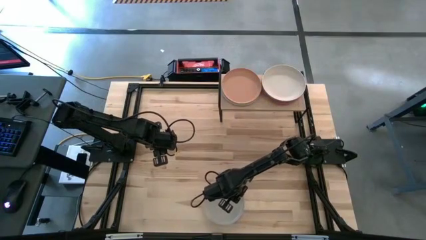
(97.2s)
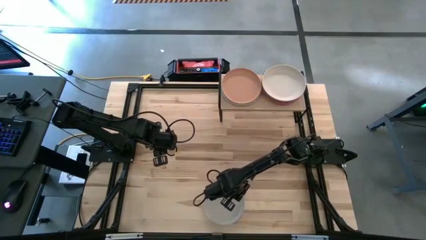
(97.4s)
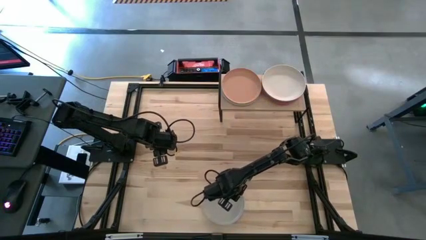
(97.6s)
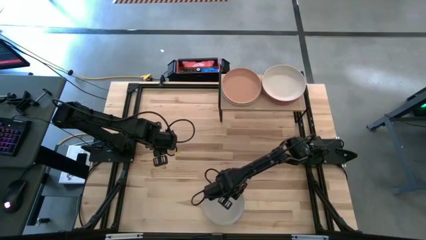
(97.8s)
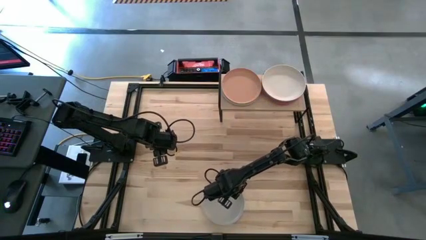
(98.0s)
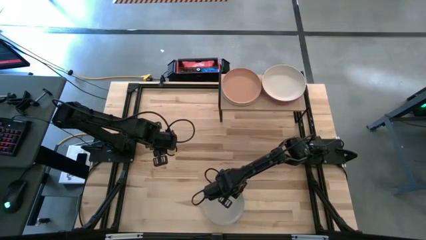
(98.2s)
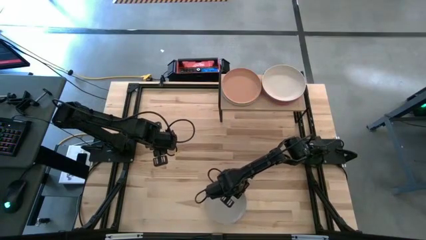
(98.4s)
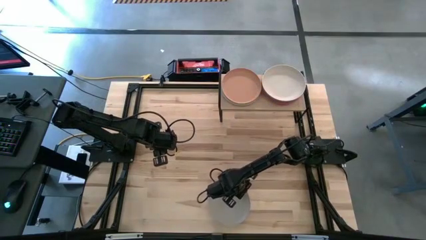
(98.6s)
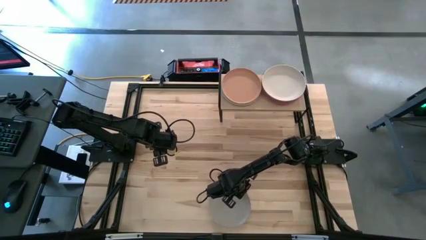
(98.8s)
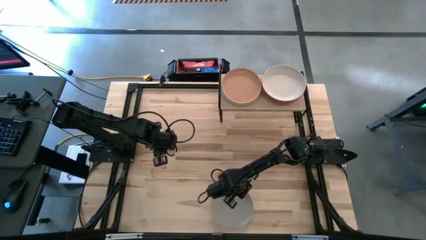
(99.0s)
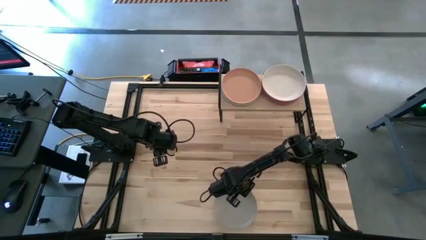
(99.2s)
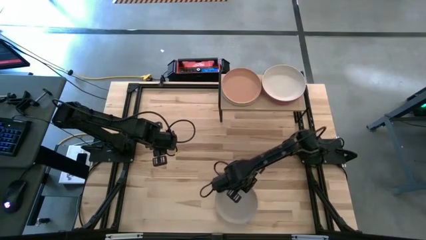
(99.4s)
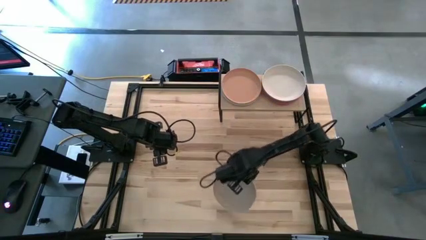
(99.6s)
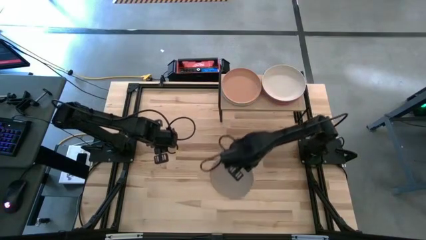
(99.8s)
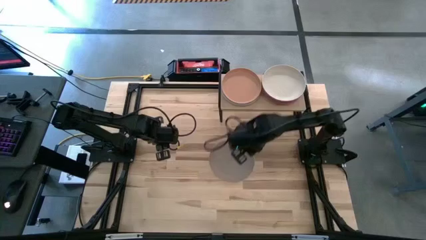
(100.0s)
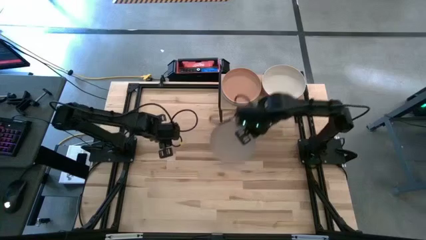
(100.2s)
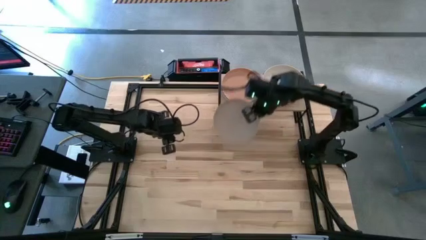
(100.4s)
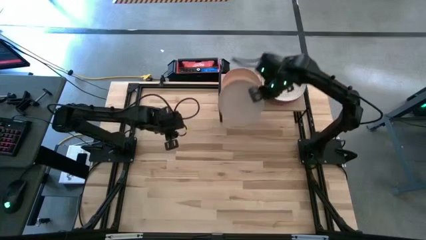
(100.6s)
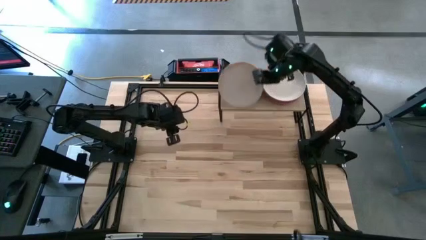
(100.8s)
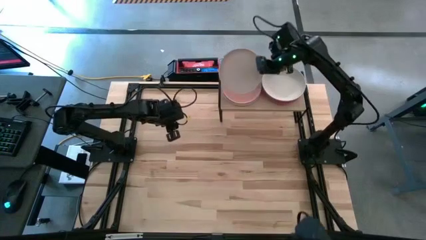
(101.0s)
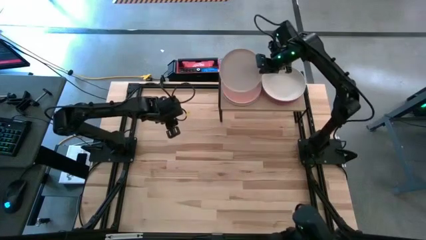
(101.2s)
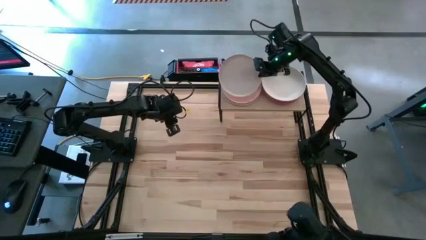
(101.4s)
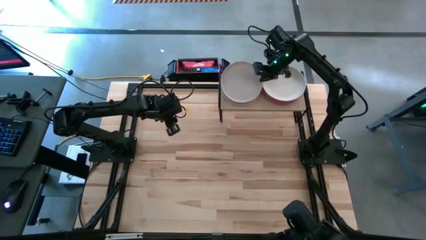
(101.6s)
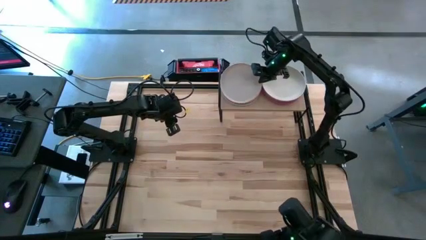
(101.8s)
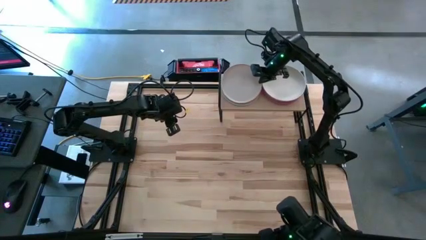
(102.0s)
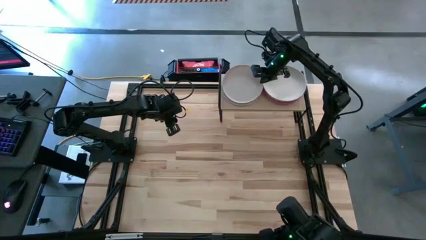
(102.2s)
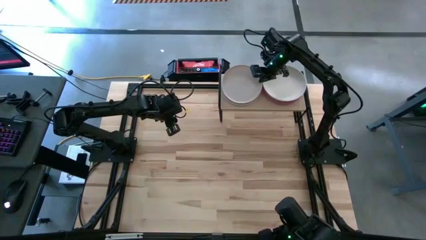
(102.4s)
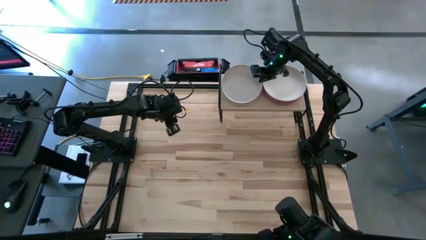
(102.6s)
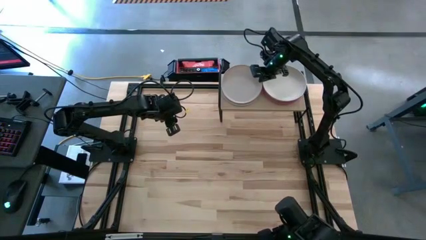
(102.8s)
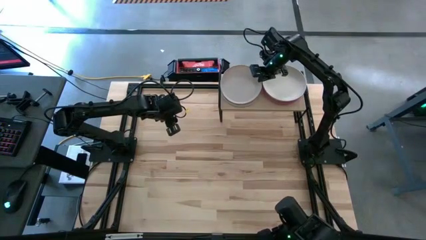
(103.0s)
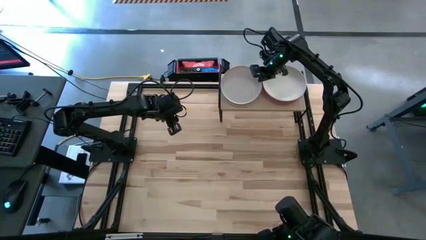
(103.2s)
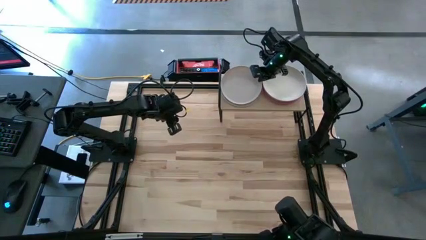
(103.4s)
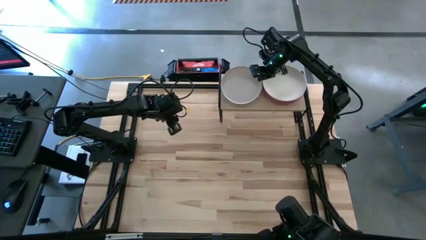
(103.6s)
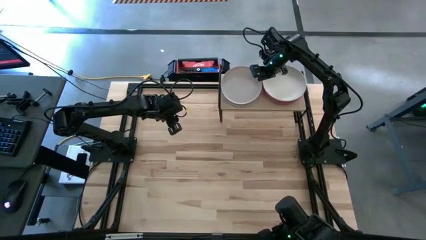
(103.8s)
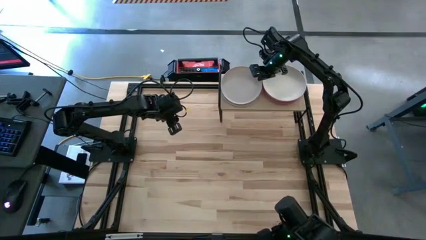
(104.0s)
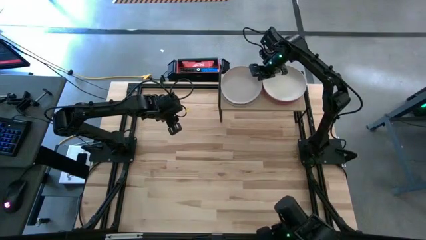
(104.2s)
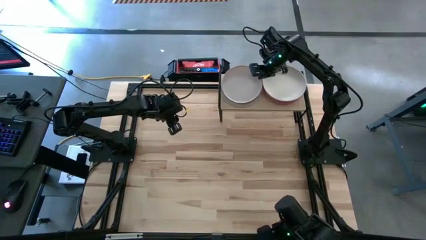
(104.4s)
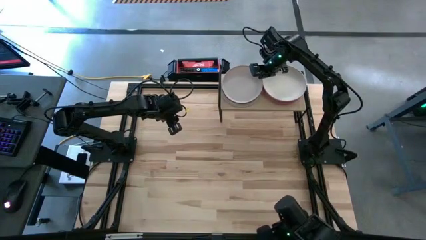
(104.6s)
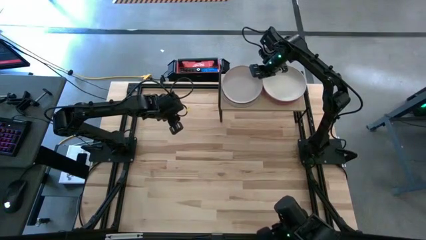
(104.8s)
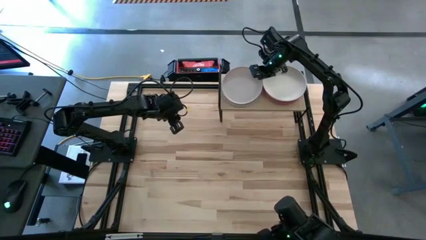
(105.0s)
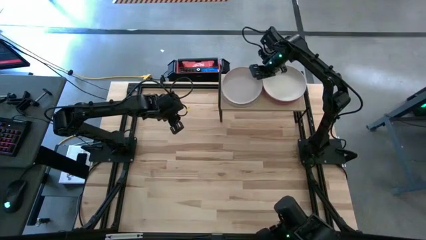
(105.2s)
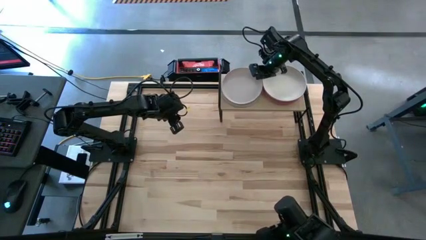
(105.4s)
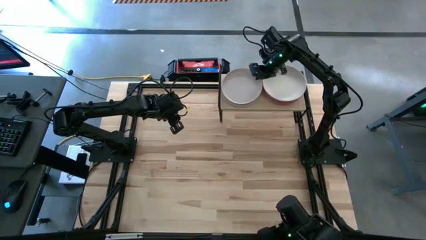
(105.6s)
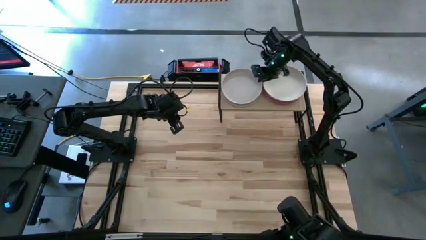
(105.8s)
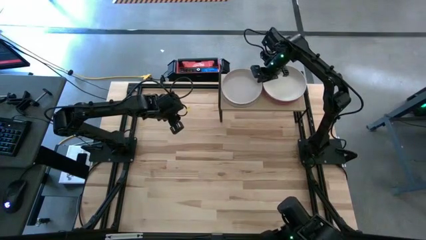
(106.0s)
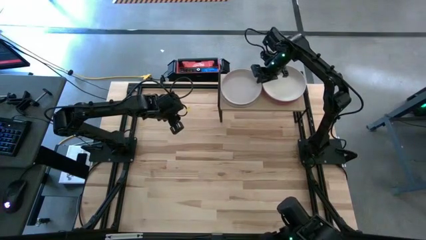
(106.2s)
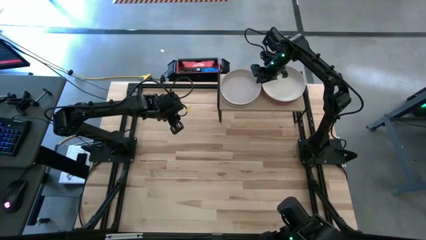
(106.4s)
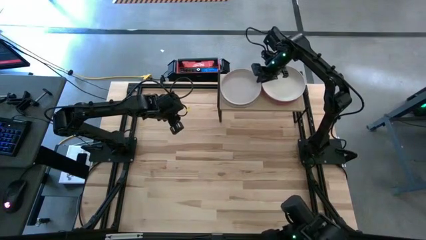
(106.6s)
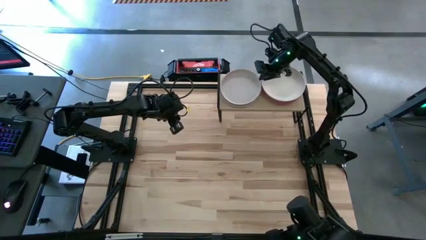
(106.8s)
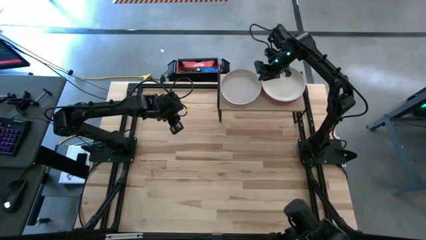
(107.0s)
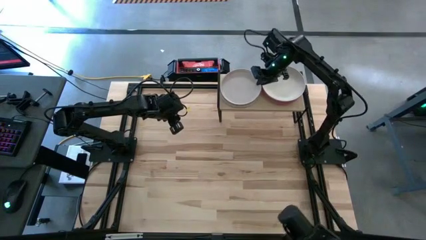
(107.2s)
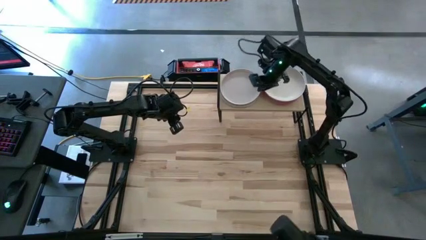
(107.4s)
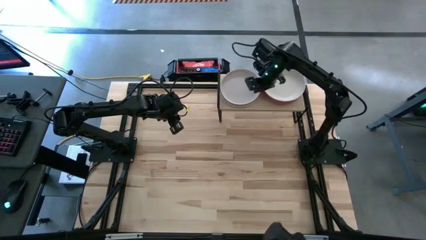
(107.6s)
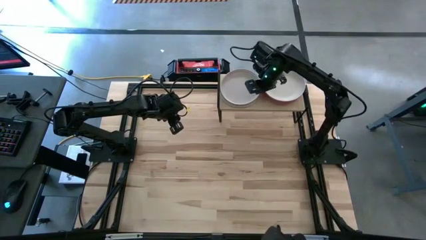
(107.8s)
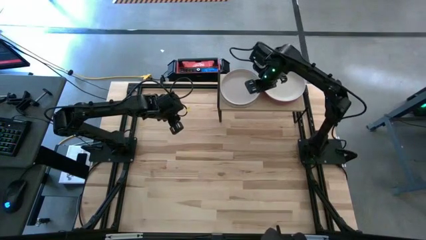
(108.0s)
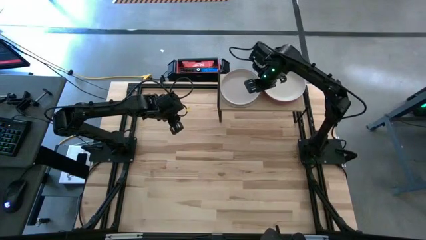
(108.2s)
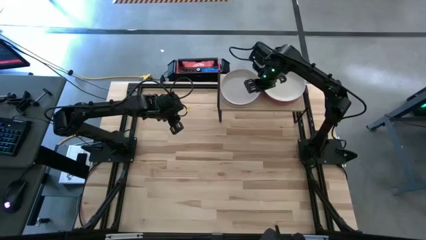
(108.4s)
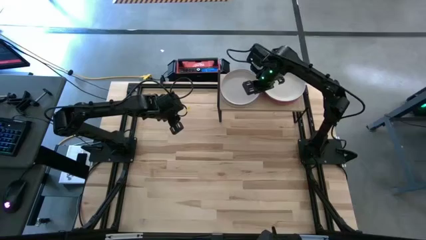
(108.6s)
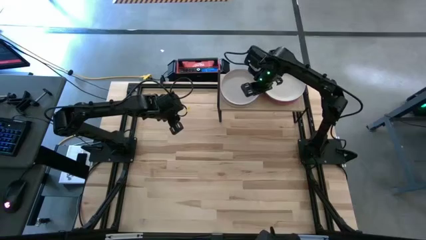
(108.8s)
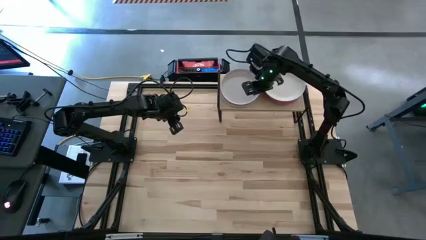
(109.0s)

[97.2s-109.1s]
Task: Place and stack plates onto a shelf
Stack the gray plate on top of the brown plate on the shelf

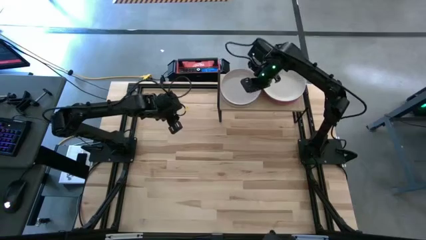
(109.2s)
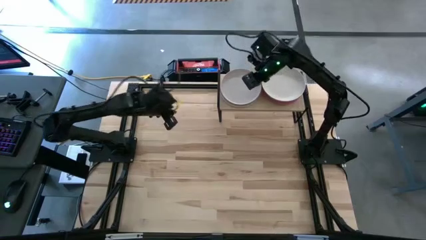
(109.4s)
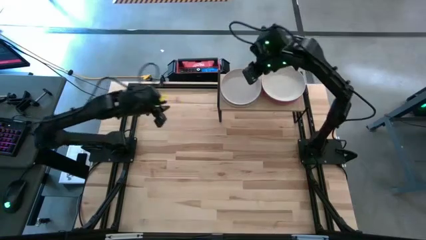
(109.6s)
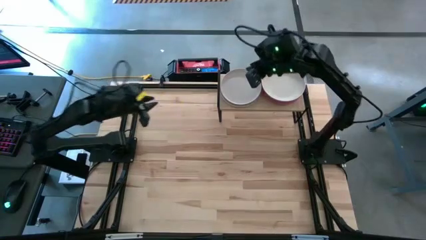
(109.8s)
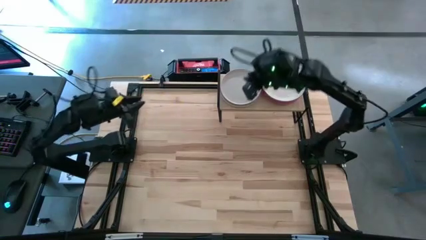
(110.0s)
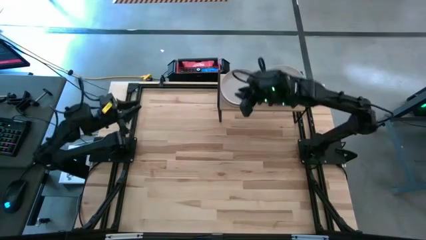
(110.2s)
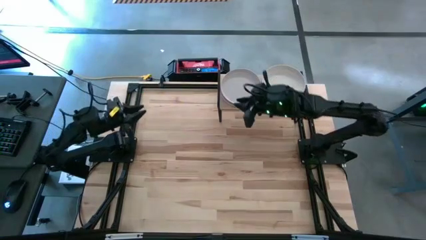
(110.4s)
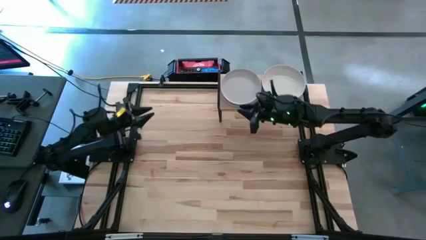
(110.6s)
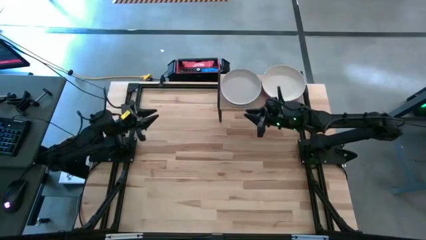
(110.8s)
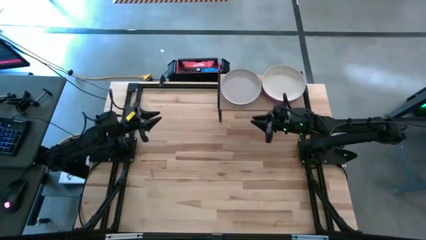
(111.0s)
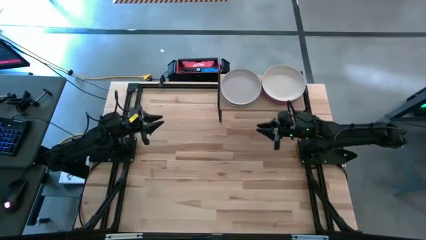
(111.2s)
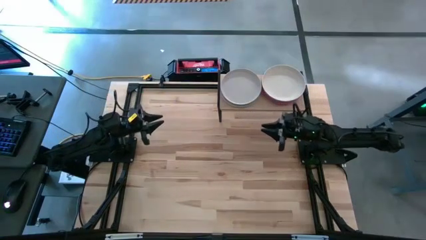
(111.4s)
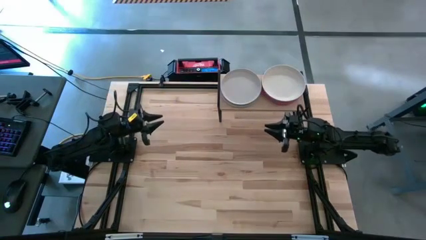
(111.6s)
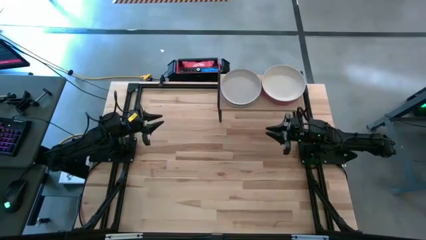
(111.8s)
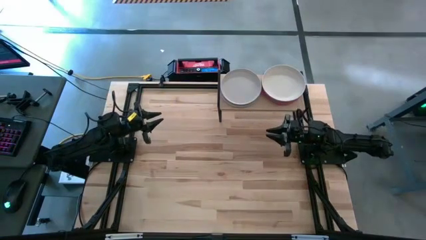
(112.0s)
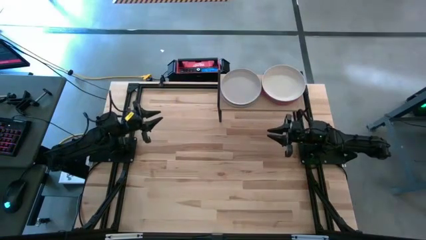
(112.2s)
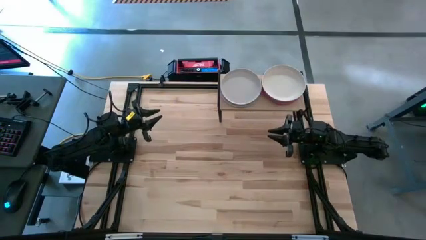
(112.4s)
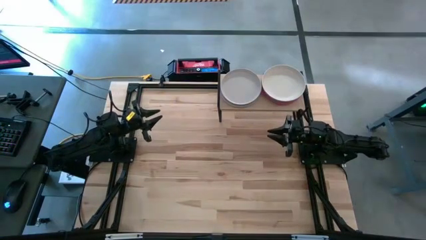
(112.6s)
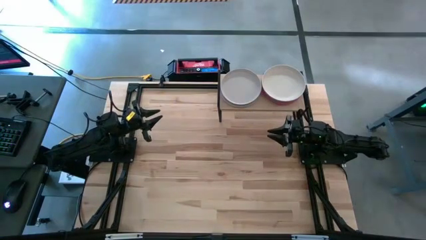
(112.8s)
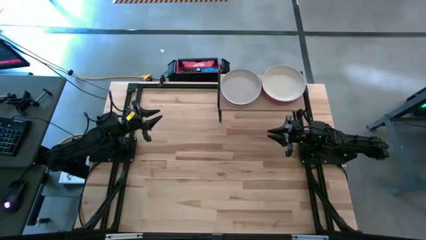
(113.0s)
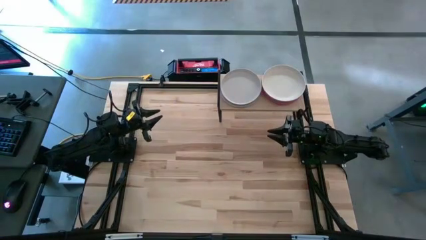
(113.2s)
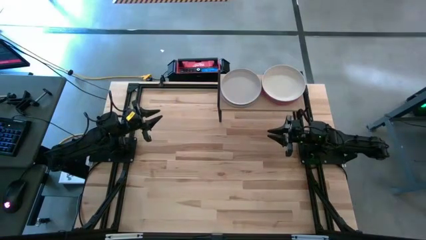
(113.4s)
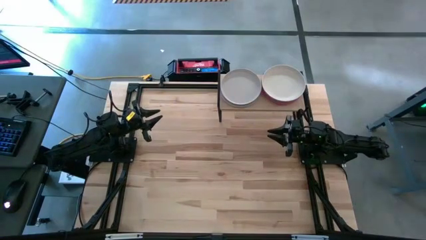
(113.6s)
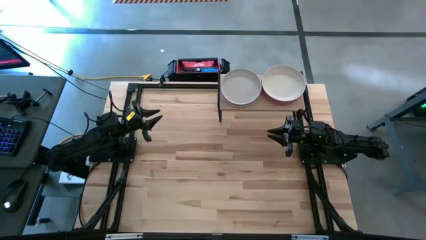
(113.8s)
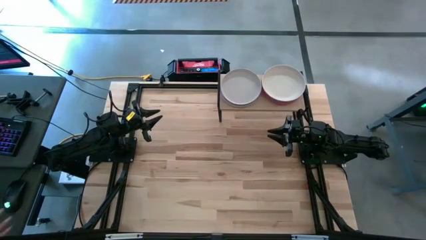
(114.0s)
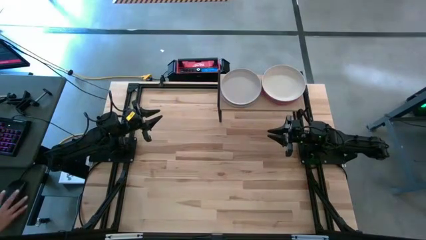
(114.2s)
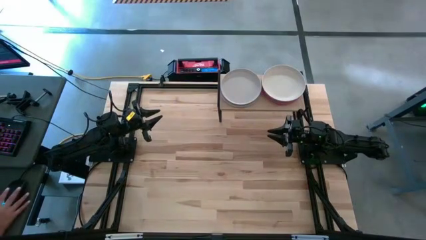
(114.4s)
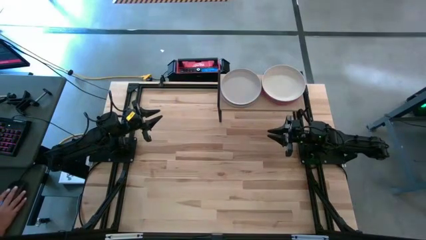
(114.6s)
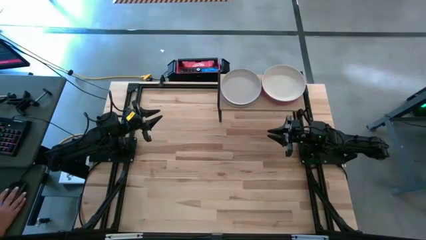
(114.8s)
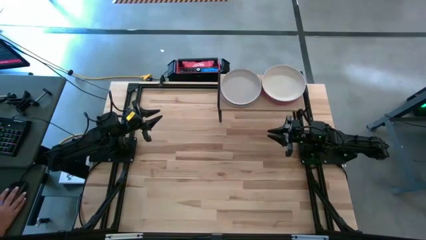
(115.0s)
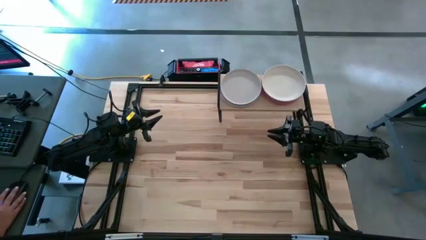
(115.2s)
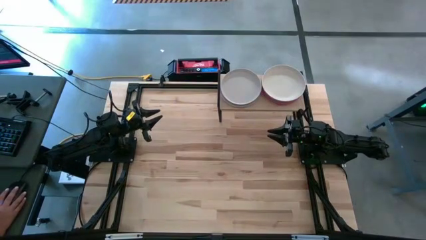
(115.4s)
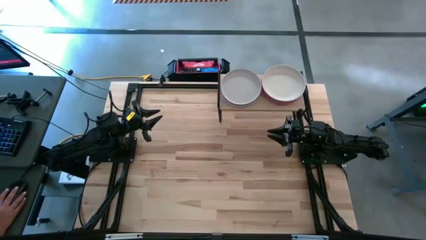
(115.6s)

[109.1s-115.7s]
Return to Home Position
